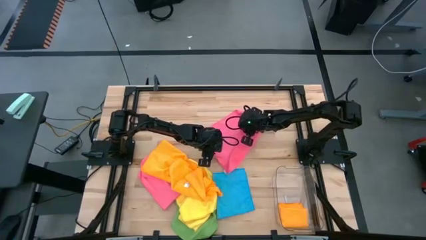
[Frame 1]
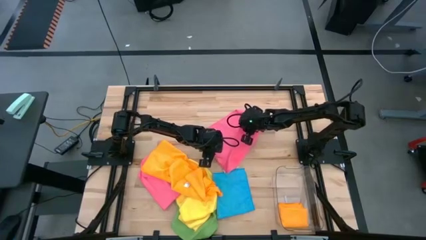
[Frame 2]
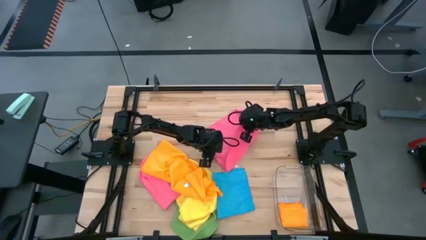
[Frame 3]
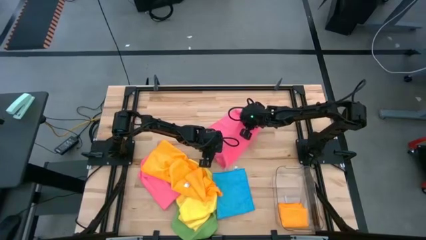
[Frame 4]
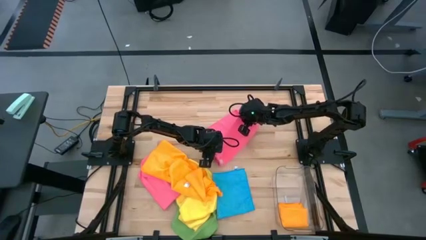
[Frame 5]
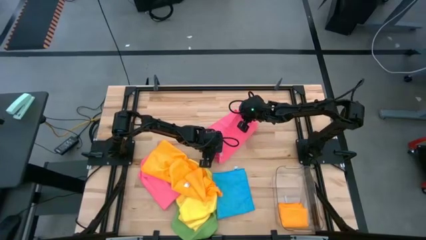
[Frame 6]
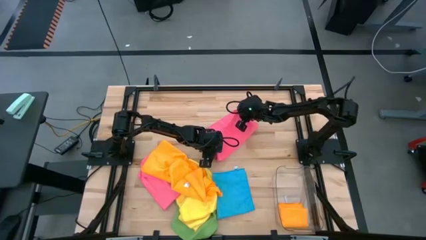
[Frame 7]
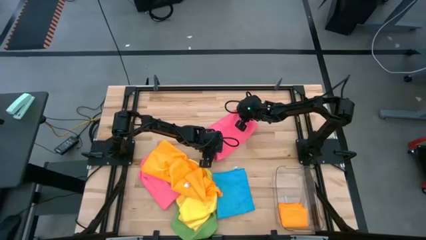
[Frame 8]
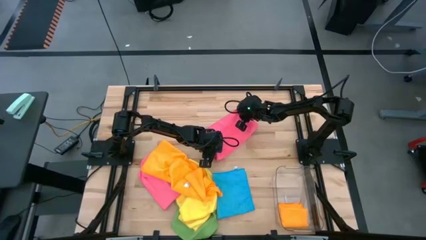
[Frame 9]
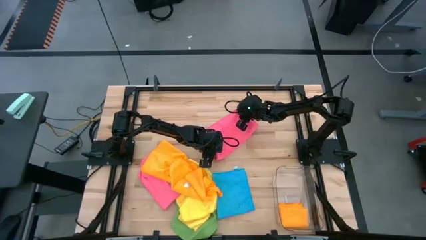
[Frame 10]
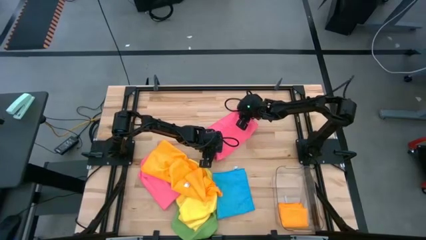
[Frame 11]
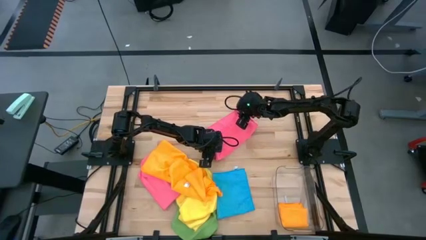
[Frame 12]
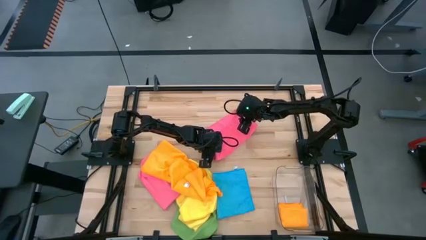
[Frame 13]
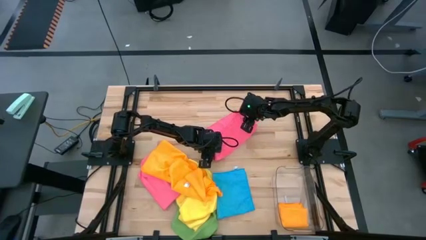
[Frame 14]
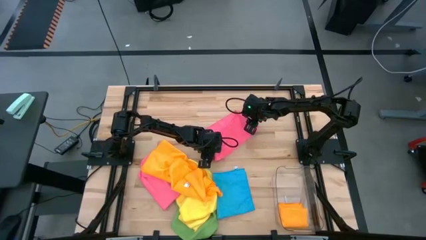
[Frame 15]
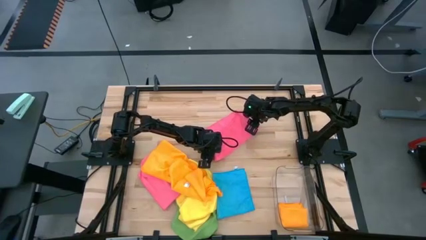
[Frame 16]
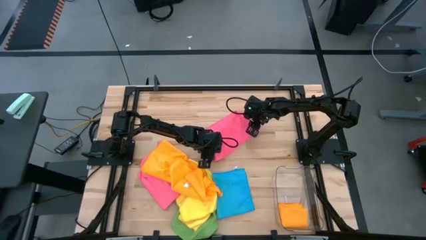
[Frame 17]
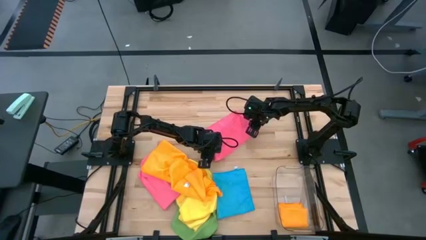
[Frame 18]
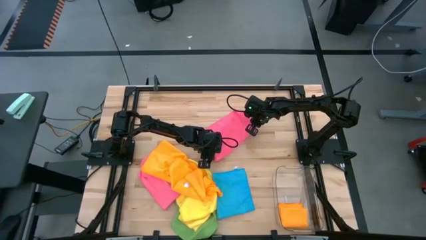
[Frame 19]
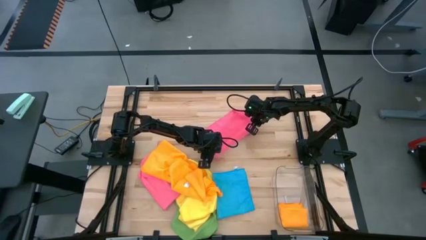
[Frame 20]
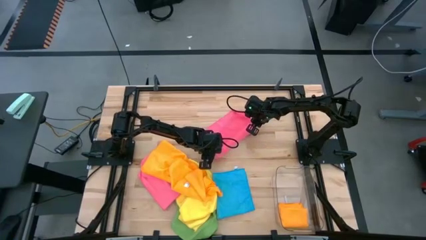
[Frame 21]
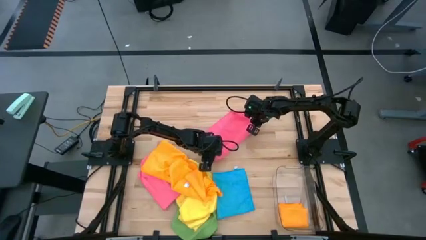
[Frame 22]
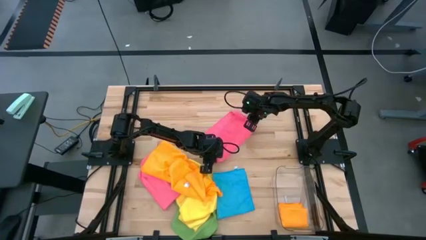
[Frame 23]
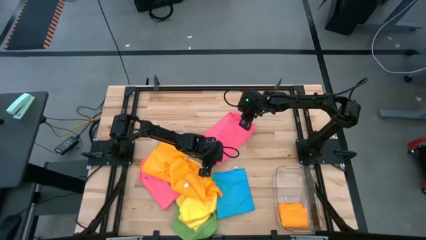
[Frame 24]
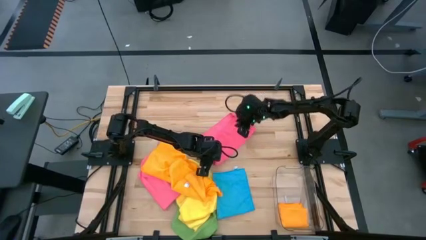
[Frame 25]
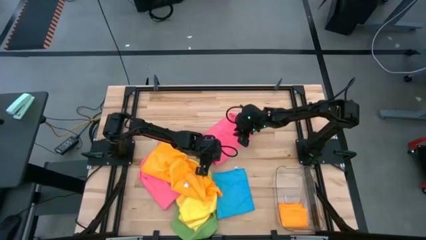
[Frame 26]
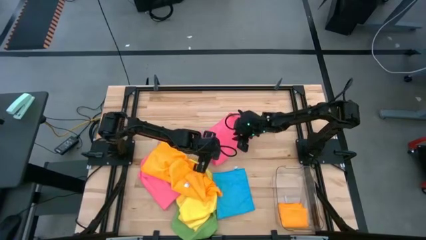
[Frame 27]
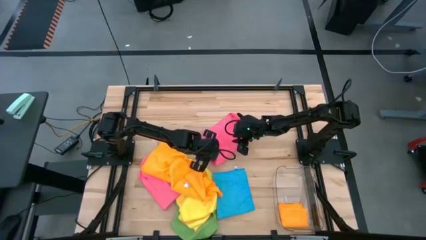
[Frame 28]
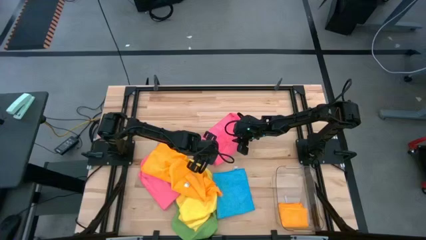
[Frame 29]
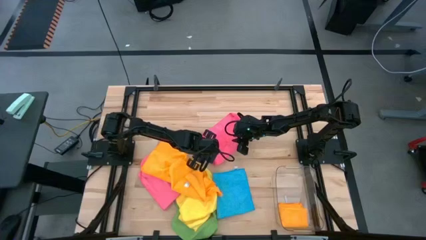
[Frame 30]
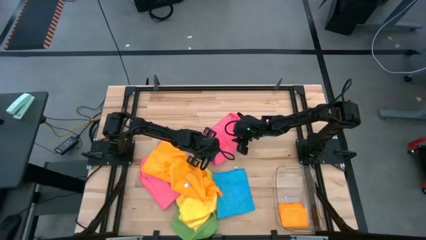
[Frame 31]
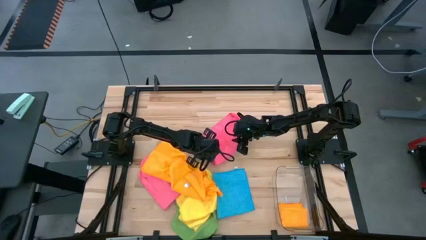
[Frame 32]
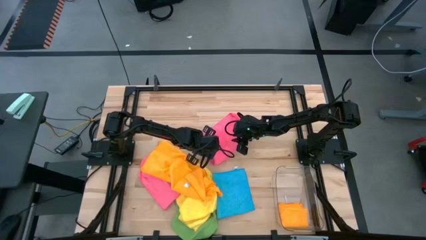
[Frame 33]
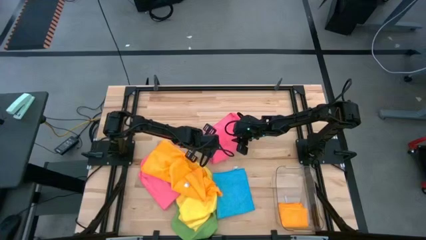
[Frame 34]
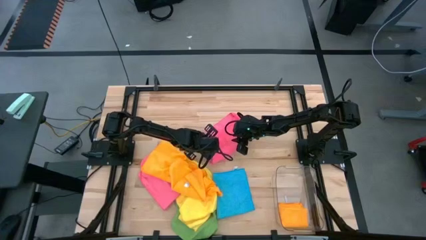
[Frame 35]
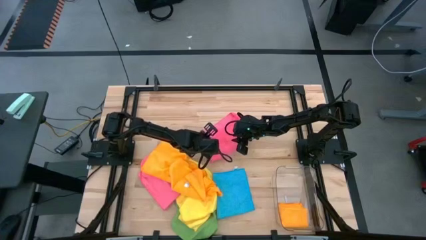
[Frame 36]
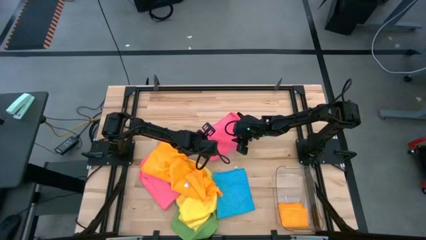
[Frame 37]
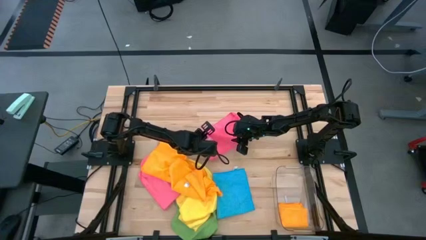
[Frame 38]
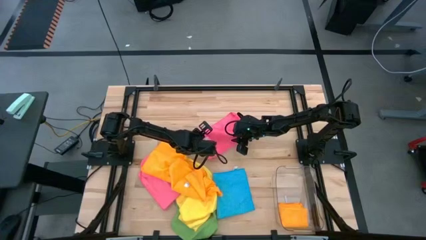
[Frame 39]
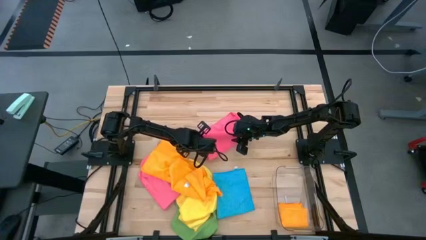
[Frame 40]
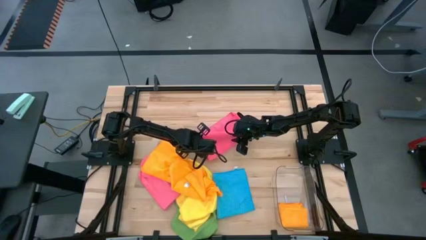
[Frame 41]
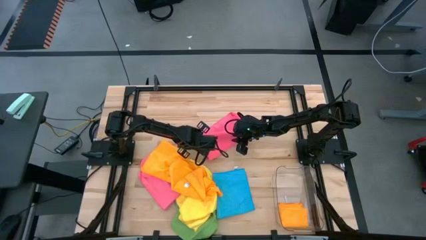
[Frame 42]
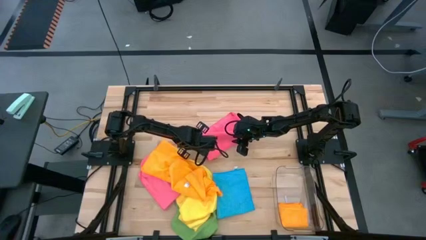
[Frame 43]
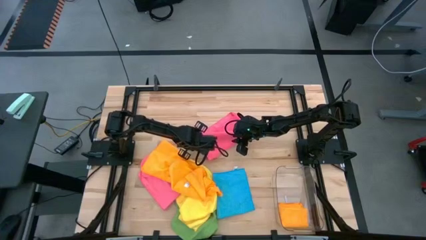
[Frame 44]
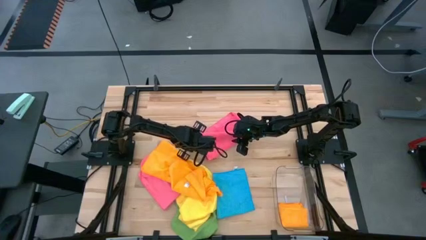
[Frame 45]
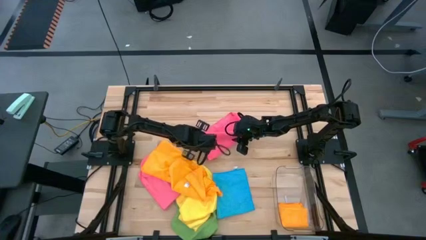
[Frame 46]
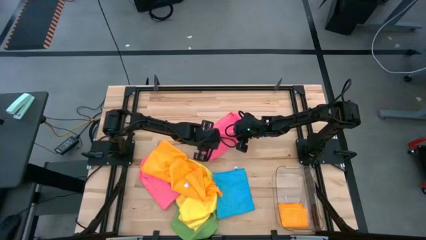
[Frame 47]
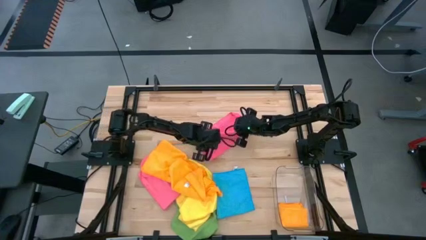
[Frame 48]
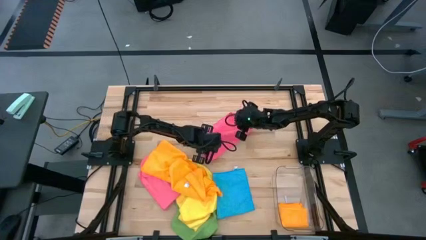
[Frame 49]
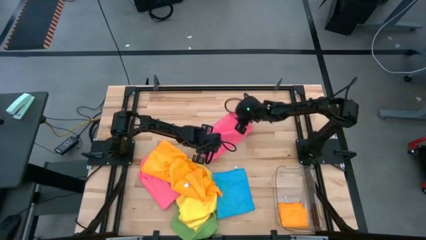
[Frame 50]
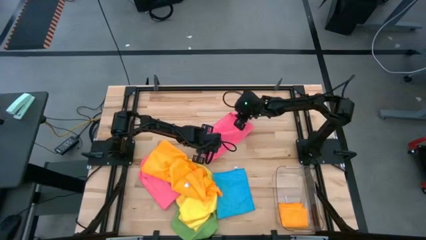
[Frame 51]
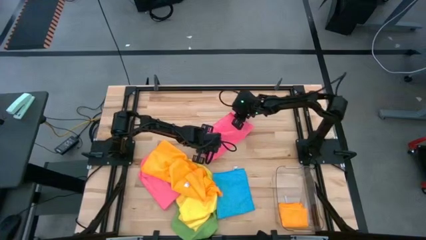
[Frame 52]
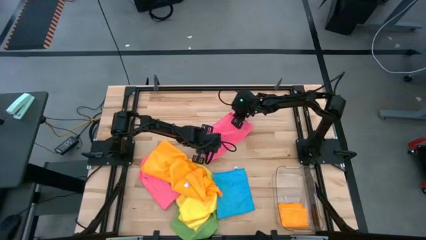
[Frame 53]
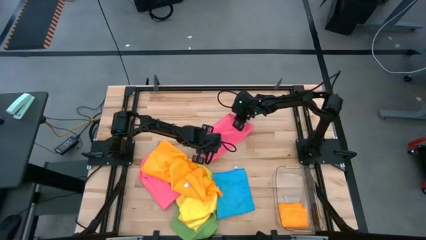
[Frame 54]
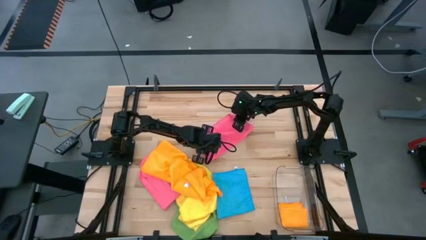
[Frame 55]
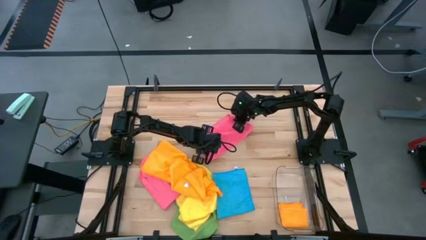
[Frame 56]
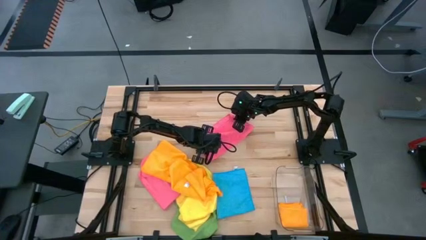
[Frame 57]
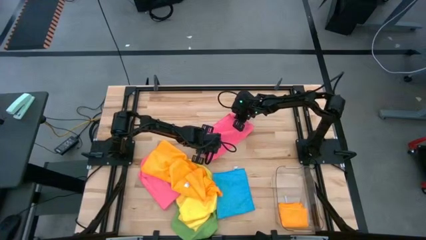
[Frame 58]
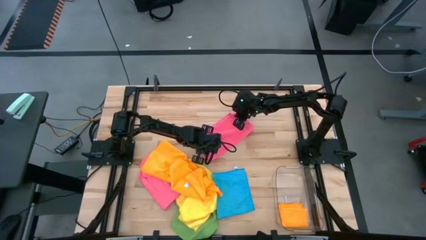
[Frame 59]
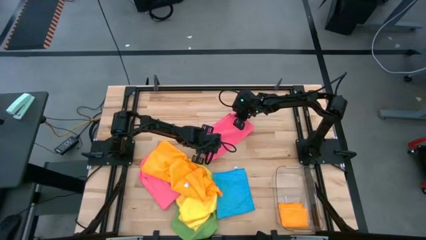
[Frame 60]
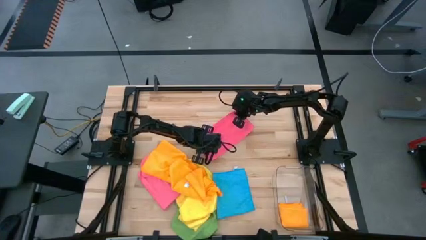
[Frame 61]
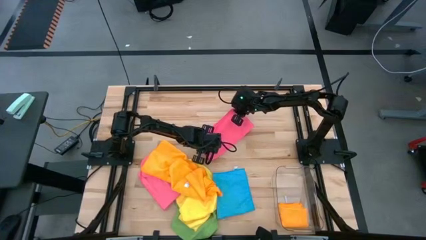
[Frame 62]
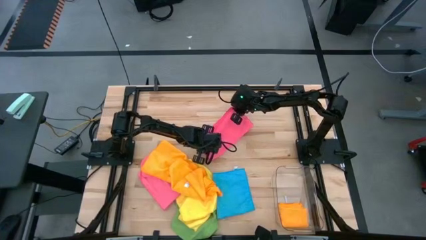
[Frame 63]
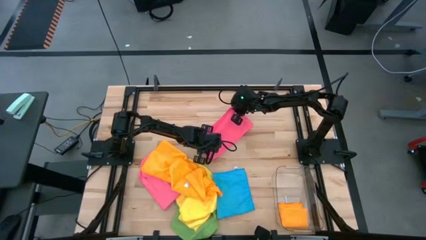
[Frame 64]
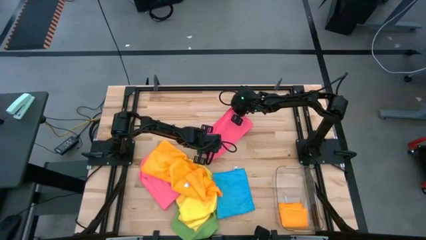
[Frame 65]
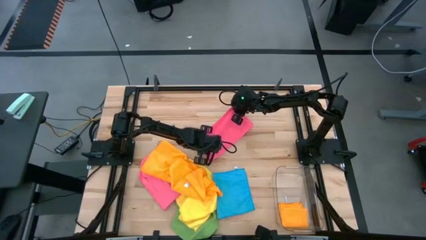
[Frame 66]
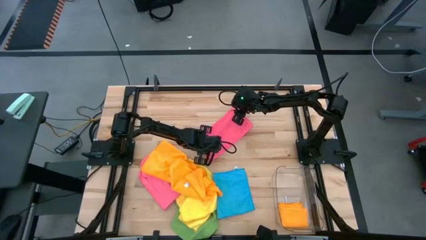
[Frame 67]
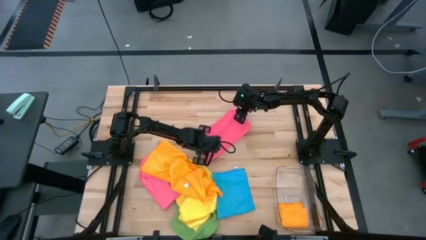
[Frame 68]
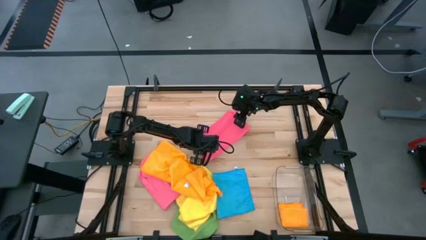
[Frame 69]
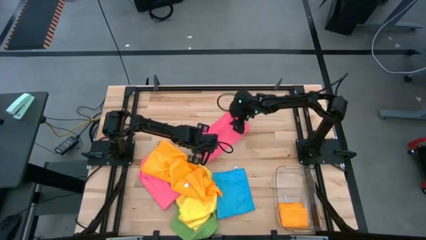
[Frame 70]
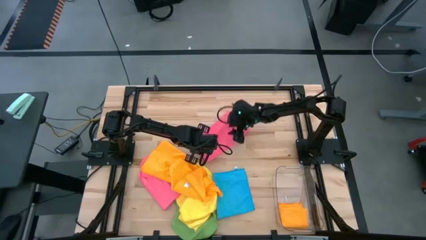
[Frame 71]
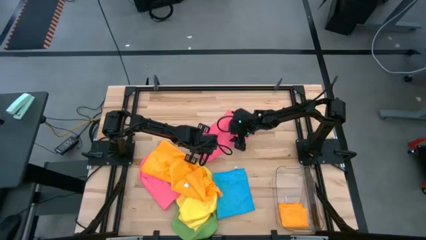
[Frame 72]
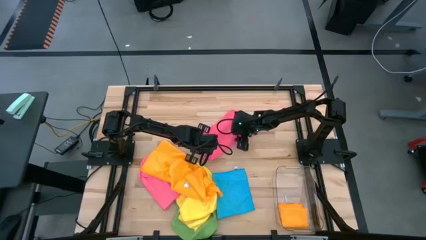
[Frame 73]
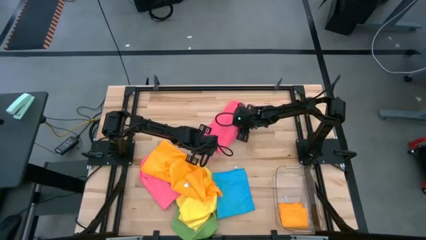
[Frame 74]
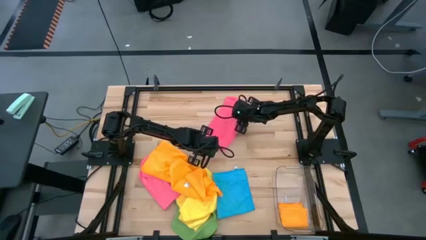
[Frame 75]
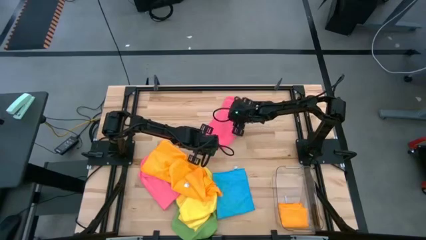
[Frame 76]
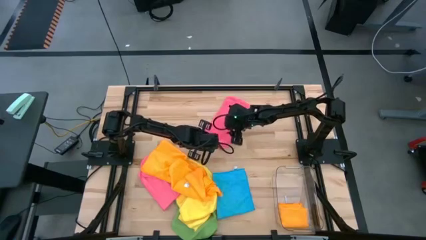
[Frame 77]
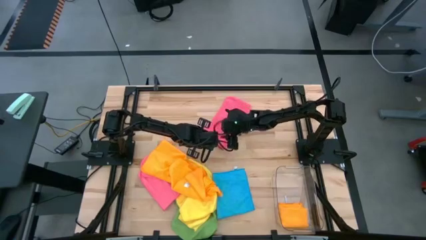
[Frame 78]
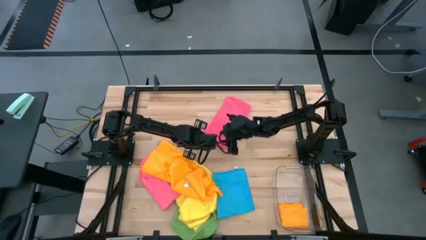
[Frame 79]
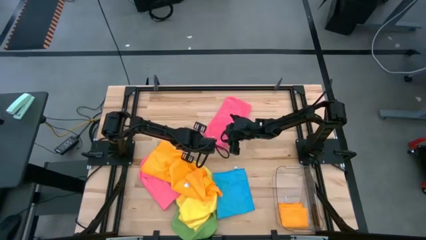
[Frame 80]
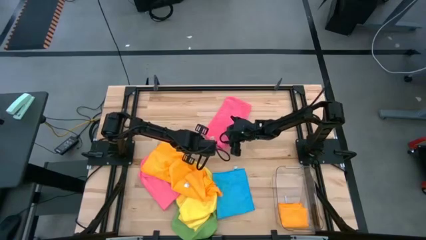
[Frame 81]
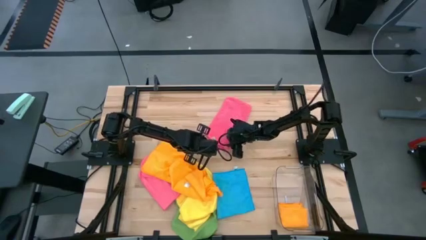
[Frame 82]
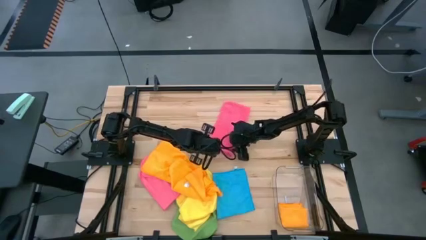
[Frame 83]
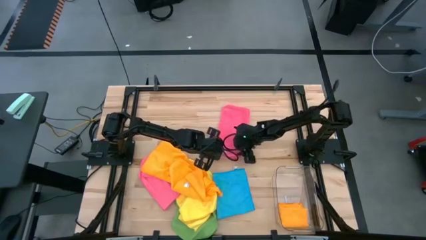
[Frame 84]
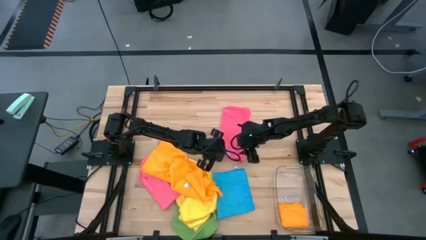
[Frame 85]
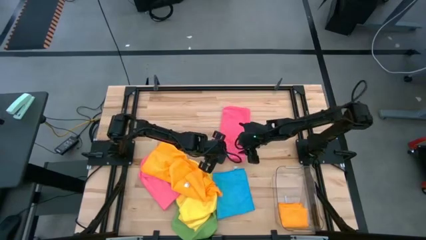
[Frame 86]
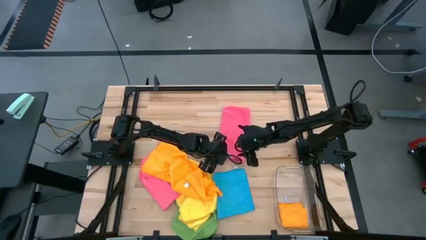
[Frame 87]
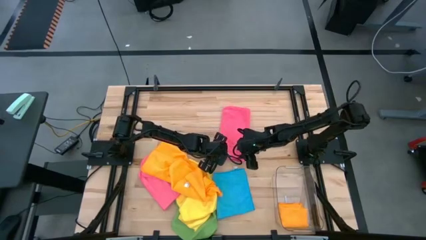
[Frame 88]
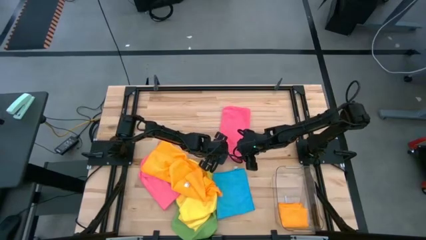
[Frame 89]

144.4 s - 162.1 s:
Task: Fold microfiber towels
Fold the pink towel
